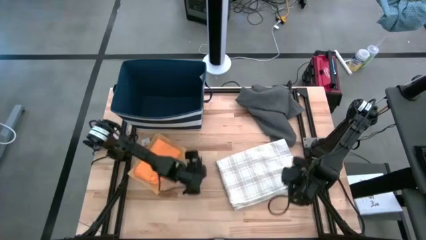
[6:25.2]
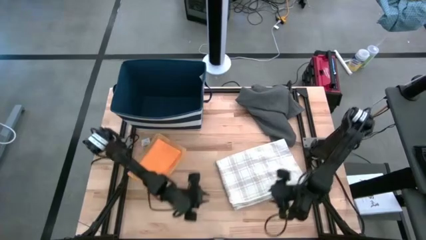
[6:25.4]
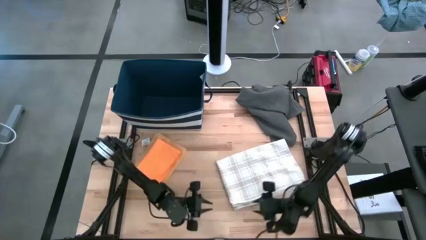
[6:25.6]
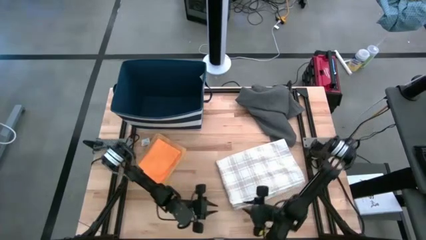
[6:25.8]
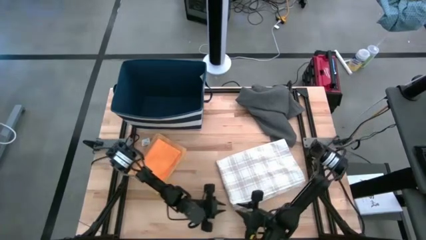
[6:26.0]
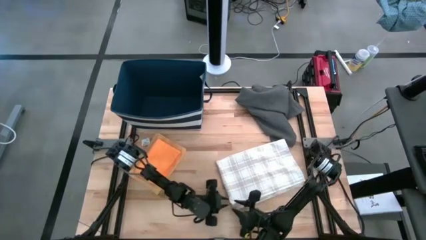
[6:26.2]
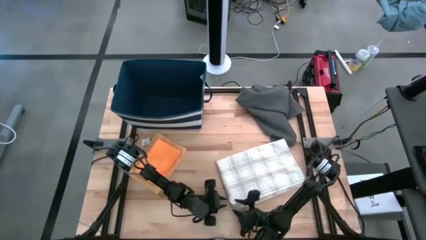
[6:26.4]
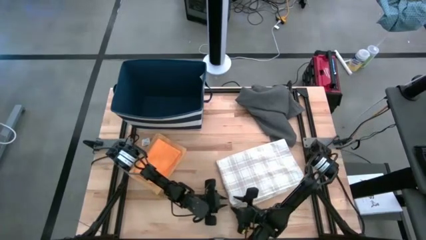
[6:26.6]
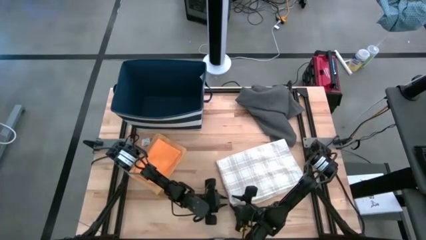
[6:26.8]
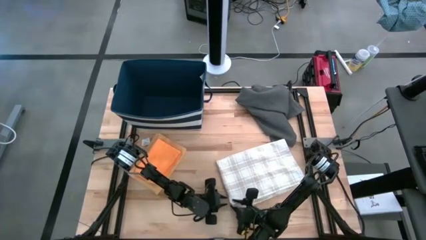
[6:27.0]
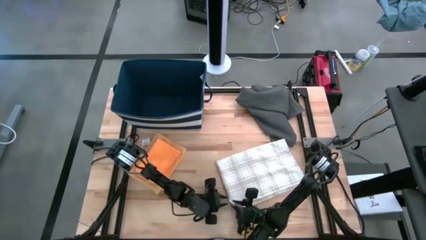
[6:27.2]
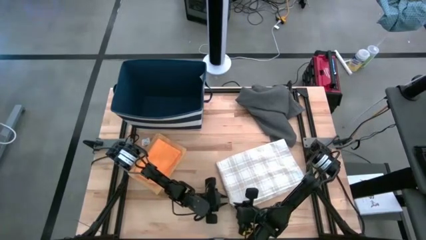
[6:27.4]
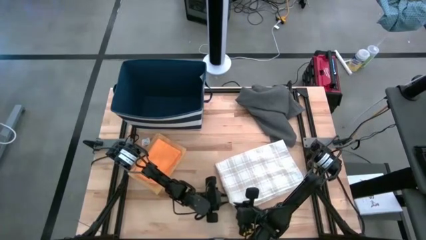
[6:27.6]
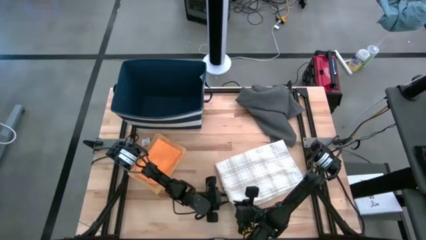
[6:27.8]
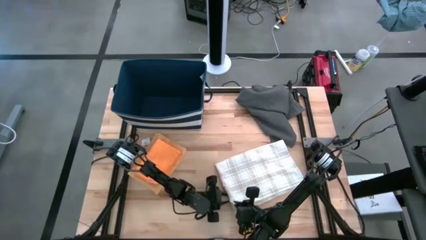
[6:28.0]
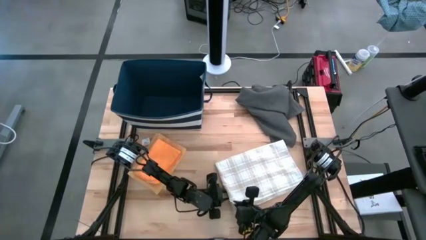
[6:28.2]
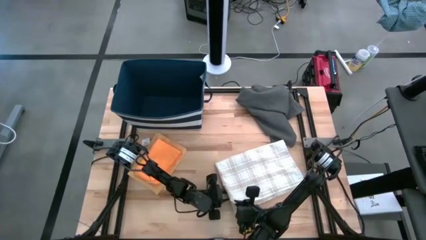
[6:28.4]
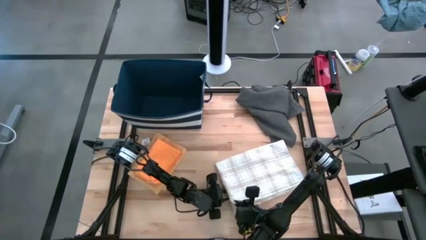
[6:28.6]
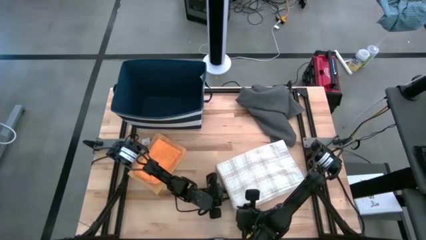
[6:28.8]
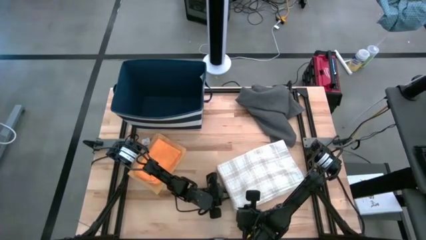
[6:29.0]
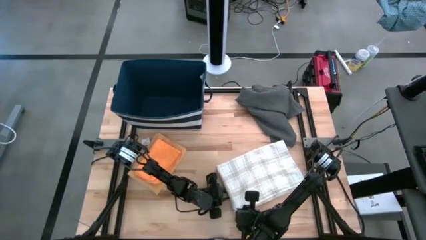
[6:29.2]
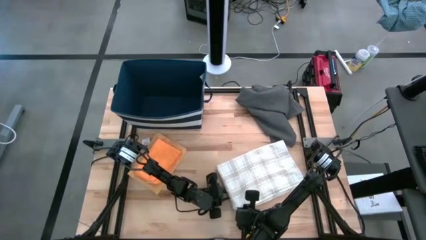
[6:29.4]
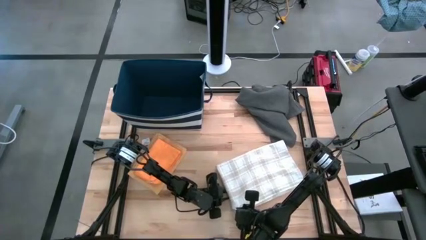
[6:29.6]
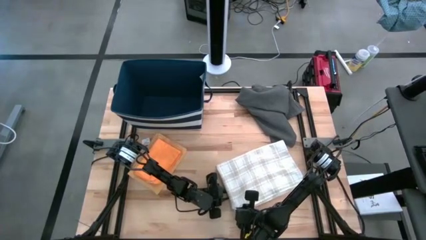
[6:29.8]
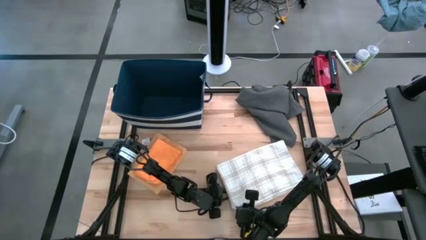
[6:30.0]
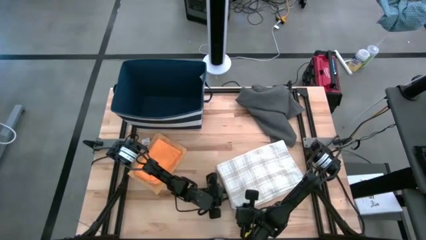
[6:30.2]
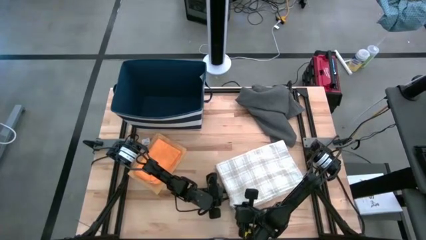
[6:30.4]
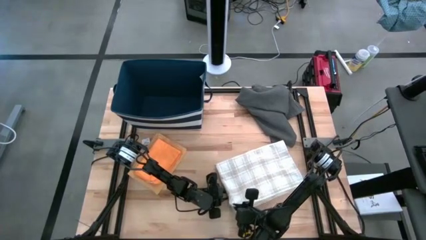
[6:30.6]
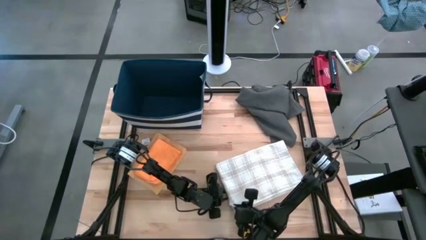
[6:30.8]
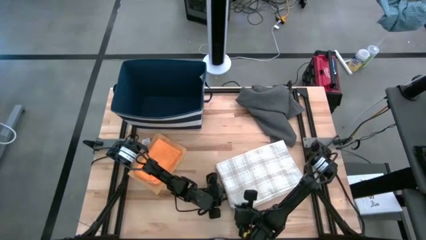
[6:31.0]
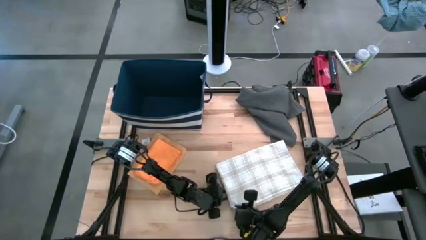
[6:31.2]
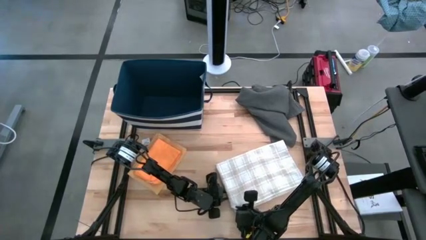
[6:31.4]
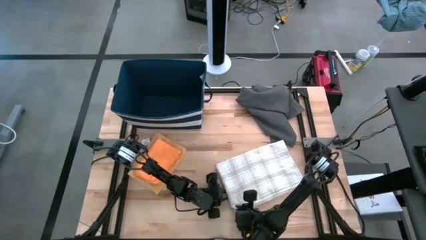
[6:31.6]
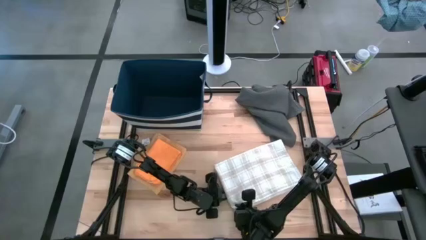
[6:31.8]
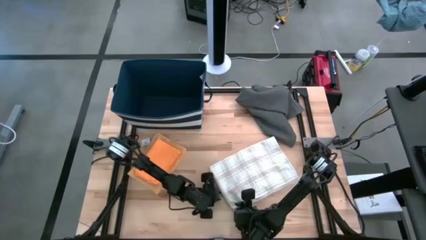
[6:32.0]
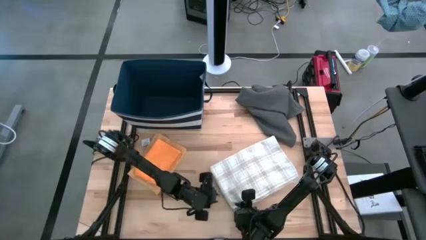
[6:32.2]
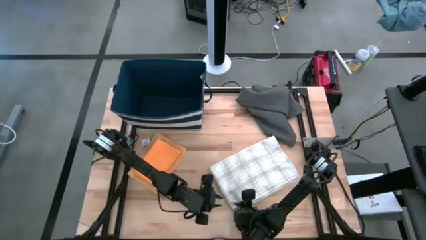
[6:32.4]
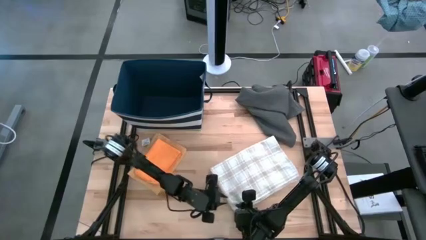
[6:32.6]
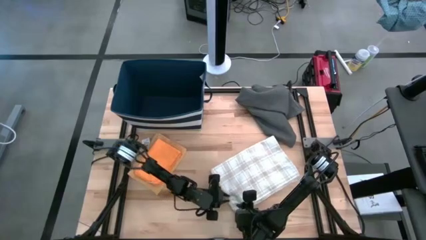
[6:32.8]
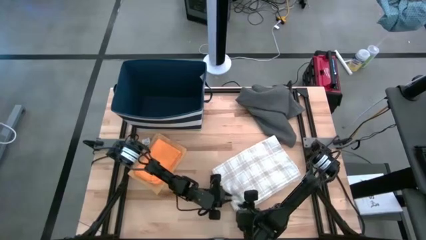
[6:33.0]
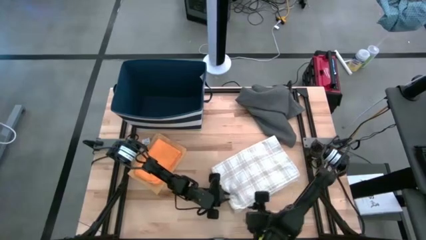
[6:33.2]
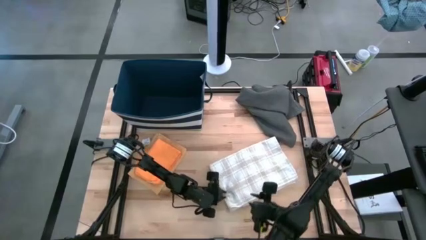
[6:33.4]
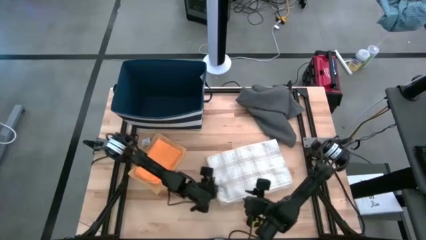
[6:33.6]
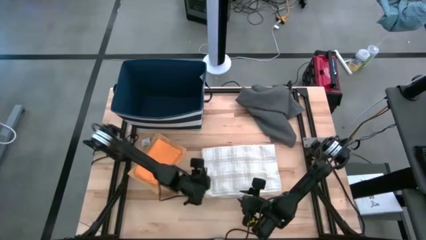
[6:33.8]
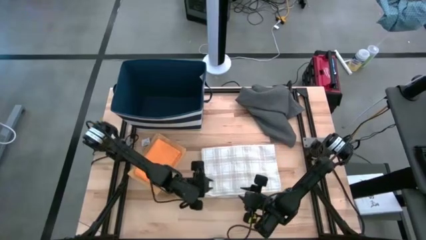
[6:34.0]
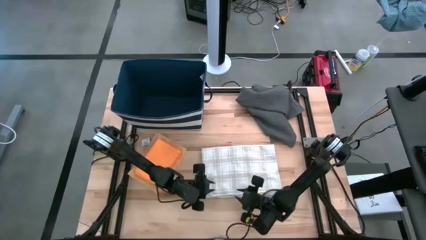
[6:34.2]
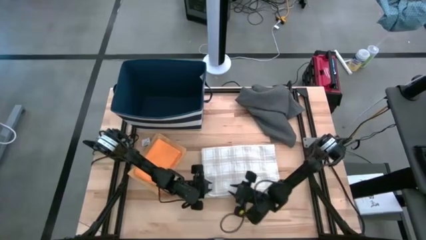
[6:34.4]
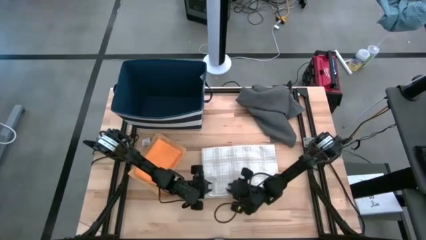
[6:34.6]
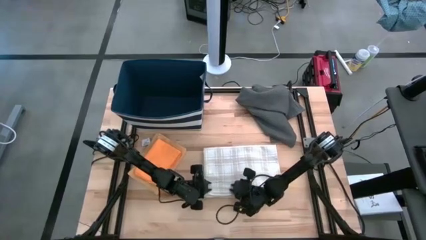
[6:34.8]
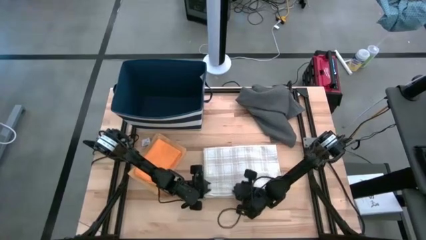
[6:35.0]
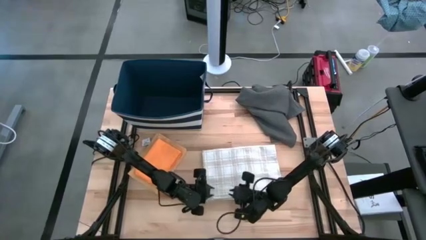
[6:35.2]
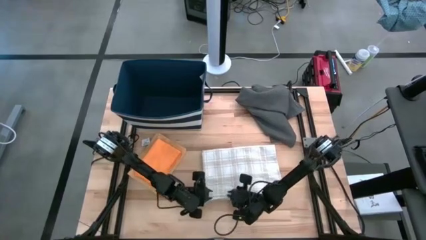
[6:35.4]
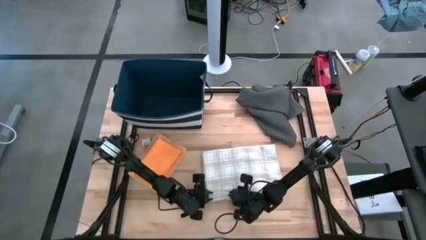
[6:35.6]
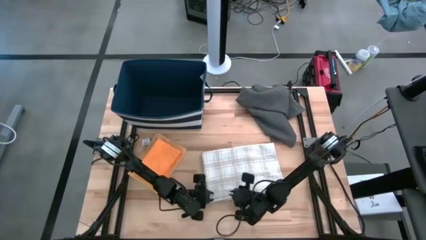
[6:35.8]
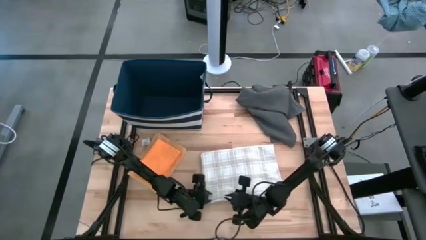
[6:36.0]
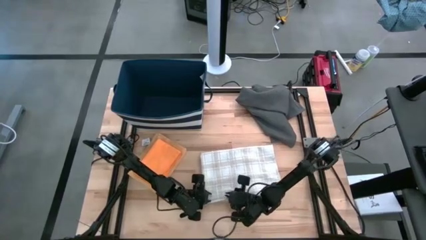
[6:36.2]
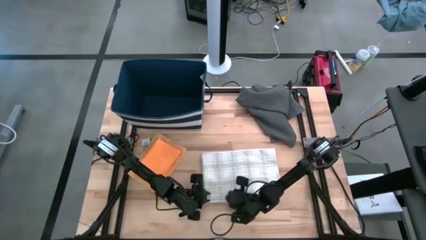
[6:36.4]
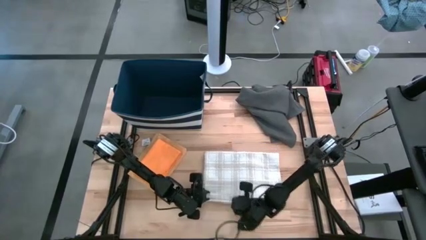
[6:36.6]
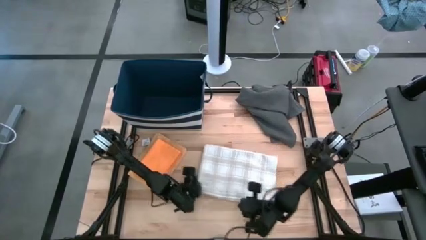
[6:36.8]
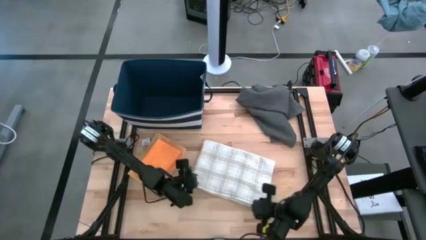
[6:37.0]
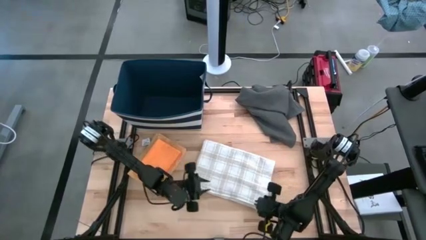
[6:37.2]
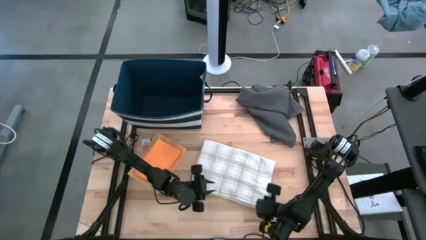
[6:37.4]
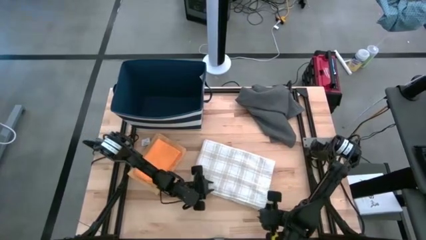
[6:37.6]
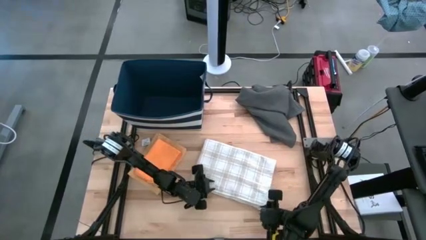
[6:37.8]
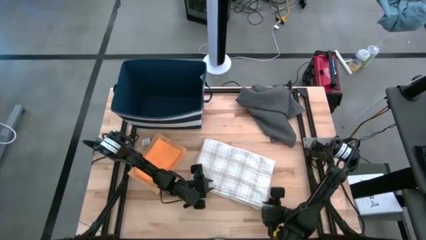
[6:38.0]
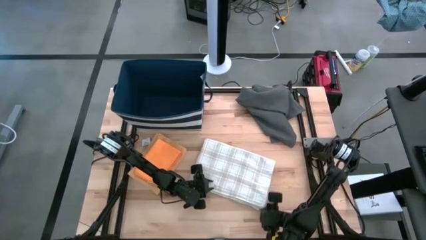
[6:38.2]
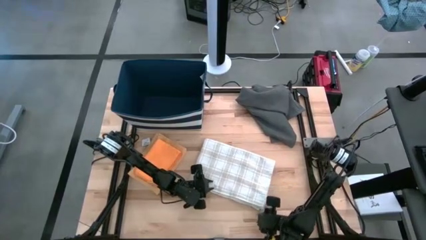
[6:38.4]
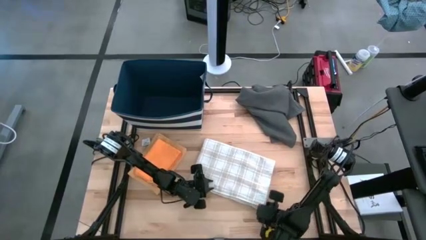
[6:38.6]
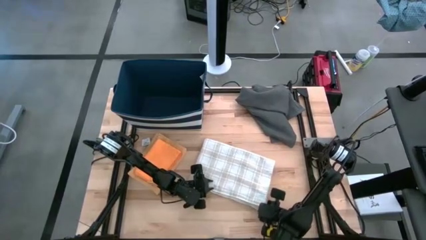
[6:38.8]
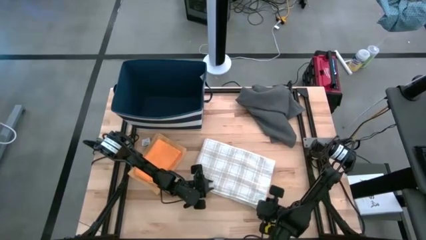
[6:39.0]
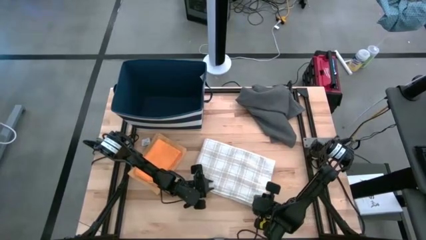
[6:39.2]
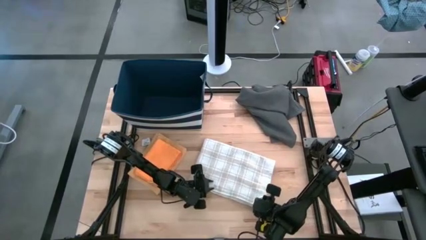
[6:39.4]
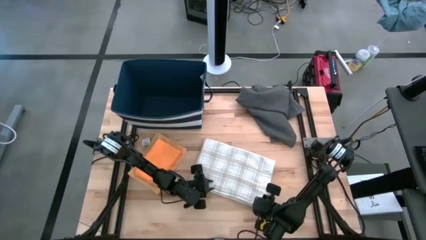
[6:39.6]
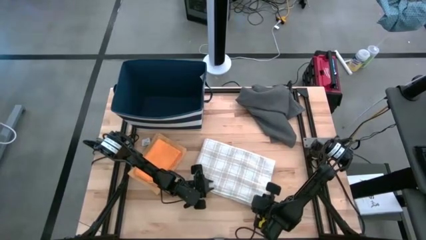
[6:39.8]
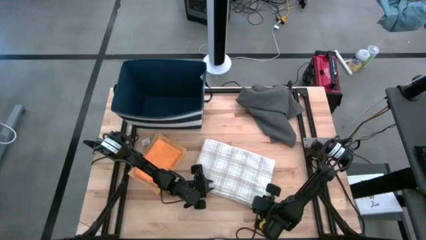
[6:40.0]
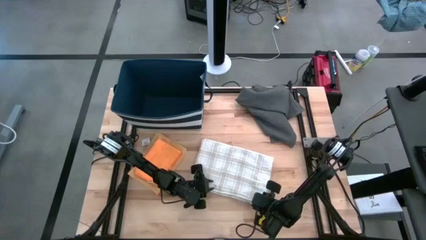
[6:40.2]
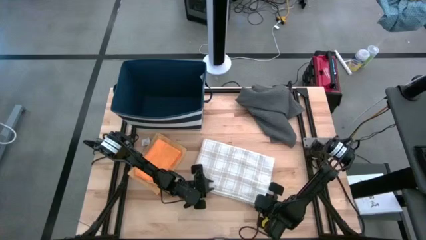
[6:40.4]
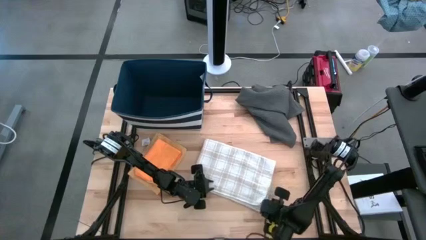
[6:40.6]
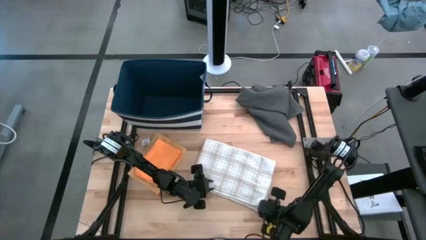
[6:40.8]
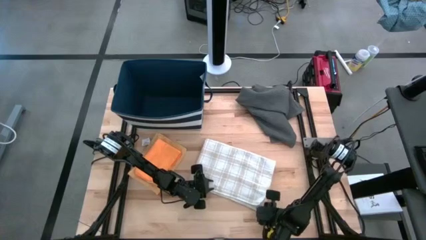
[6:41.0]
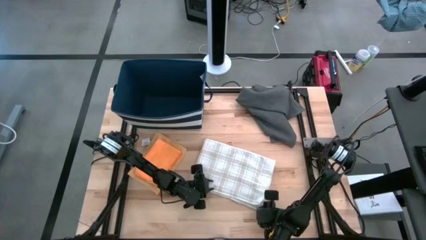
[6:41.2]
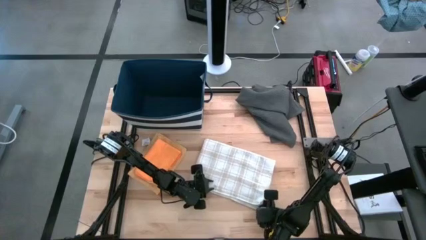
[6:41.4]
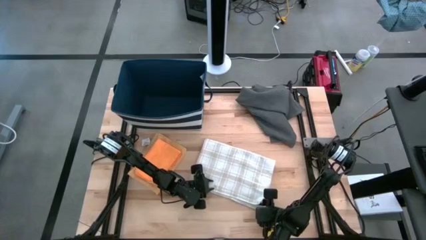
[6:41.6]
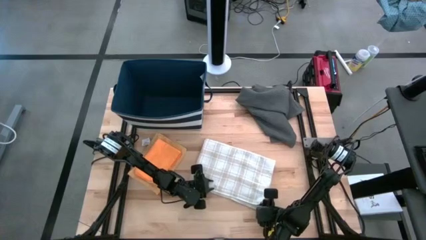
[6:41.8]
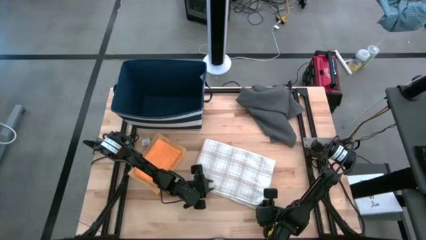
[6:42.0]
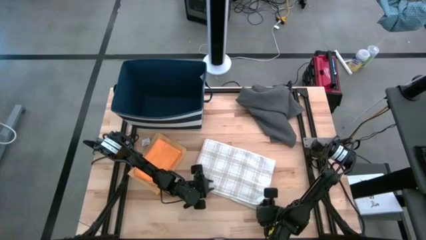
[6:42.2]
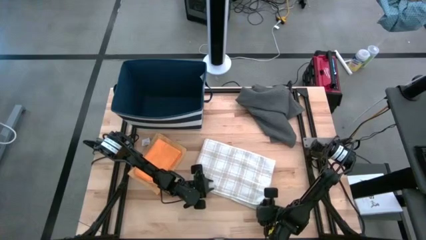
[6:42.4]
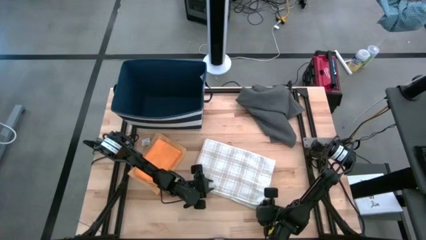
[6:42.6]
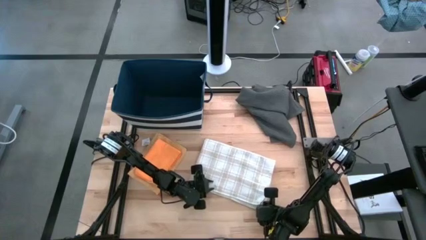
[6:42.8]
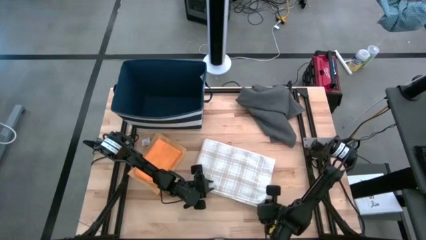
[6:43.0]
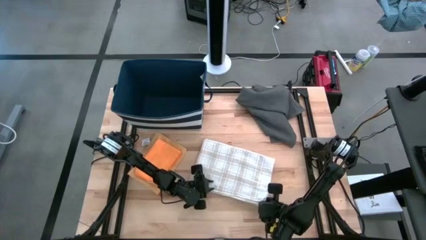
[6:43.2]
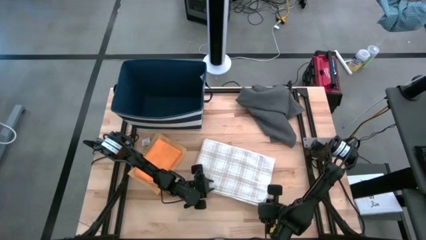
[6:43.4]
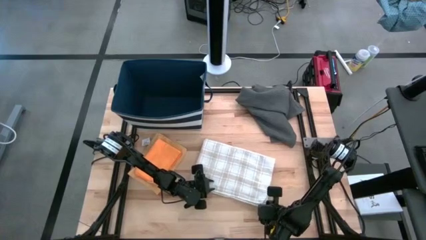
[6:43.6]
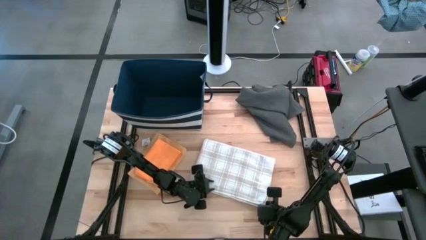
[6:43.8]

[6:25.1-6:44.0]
Task: Fold towel
Fold the white patterned kitchen towel
